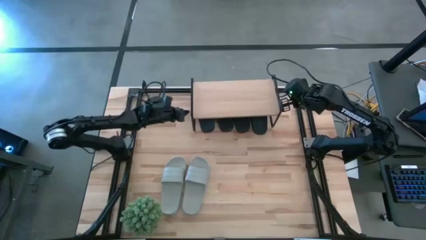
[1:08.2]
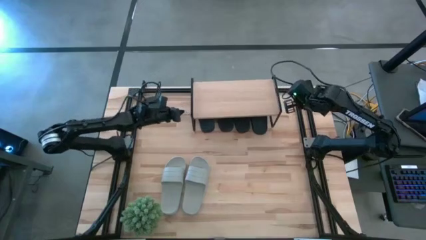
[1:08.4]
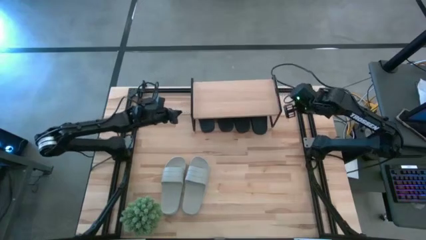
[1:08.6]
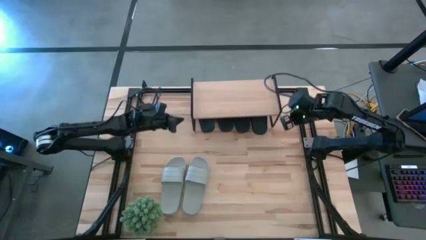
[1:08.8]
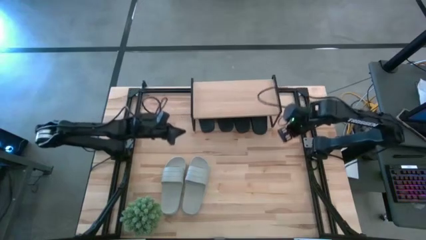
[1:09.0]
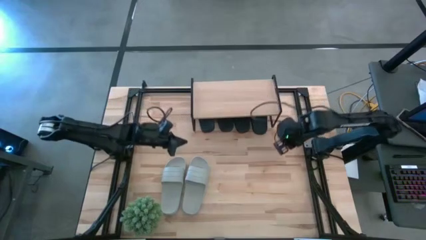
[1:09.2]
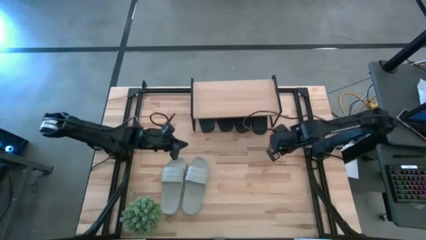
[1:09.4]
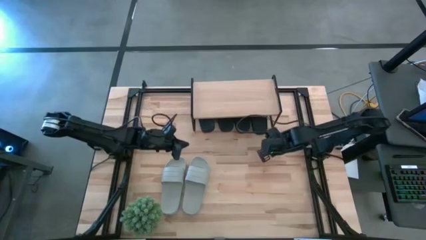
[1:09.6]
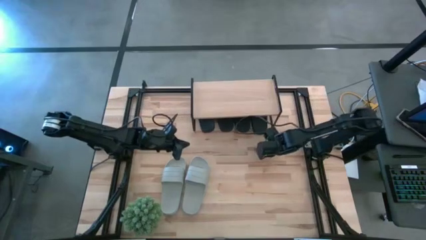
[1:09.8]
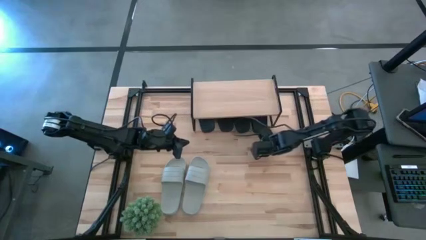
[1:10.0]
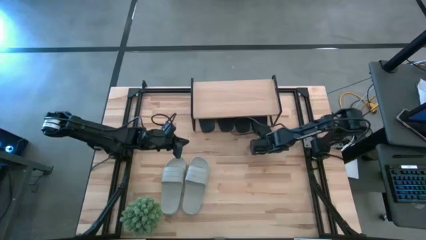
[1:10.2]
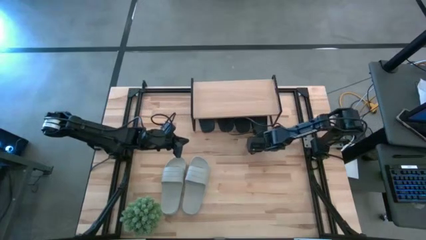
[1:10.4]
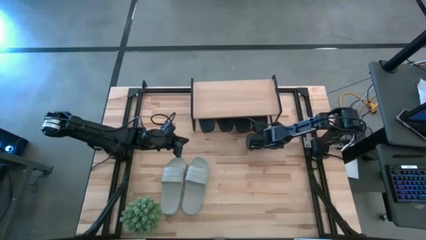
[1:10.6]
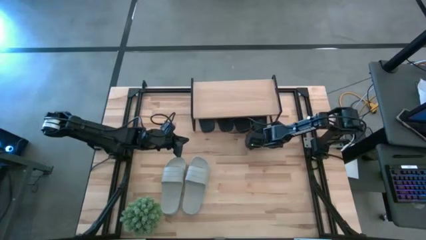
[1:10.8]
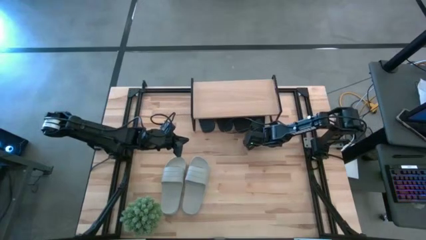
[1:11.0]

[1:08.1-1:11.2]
Task: Pick and place slides into the shelf
Adjust the black slide under the shelf

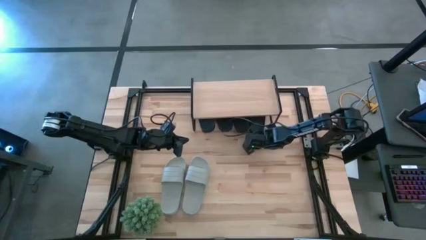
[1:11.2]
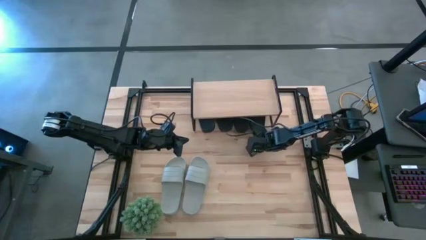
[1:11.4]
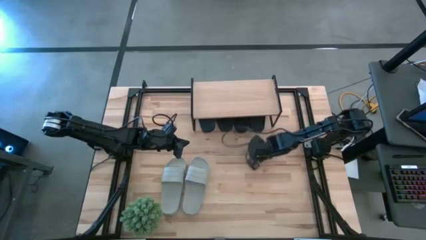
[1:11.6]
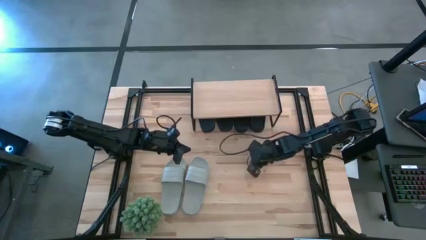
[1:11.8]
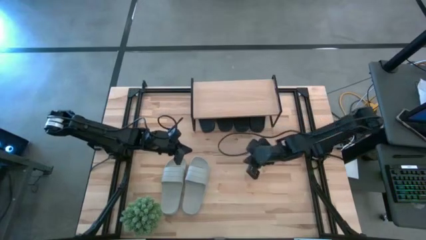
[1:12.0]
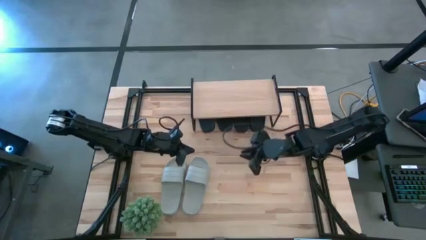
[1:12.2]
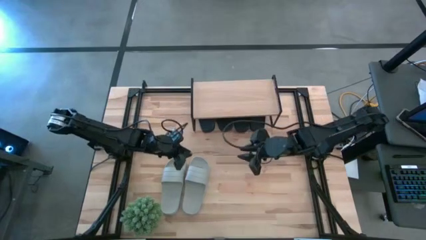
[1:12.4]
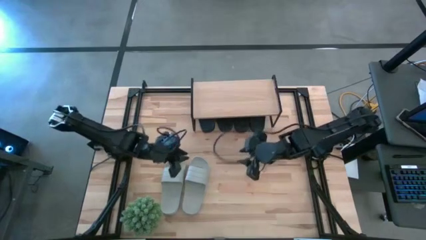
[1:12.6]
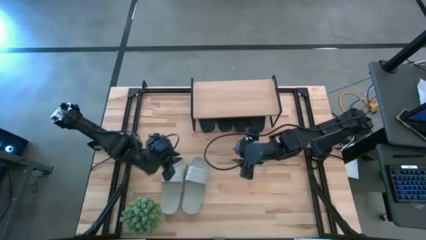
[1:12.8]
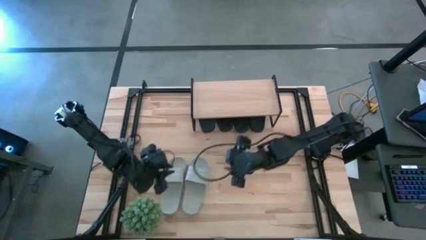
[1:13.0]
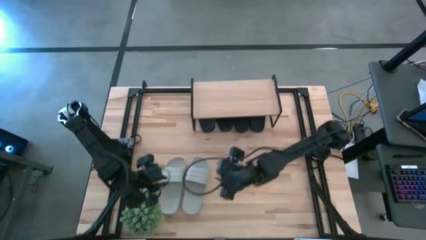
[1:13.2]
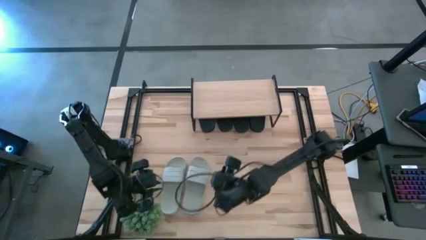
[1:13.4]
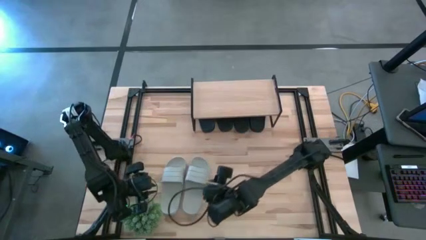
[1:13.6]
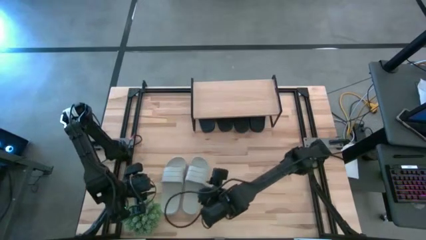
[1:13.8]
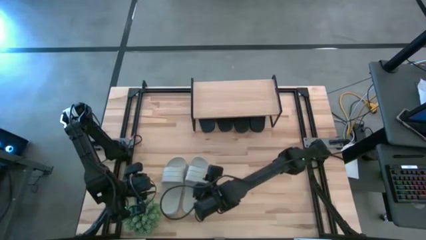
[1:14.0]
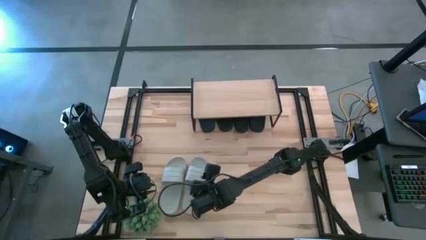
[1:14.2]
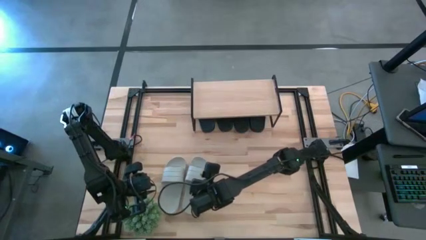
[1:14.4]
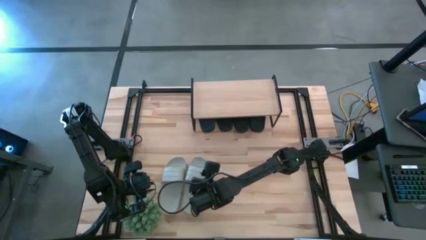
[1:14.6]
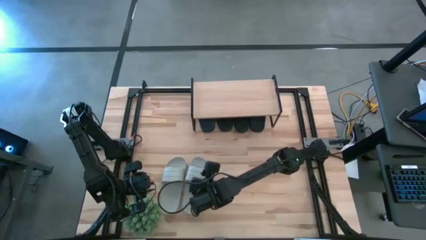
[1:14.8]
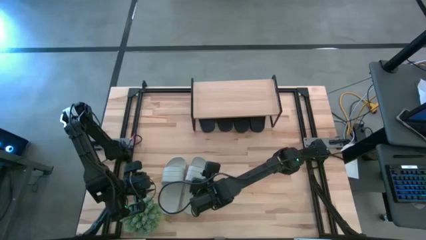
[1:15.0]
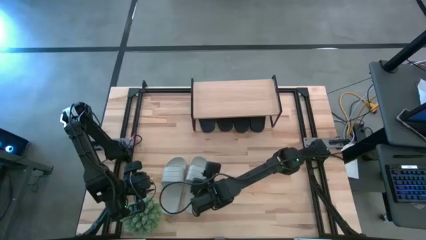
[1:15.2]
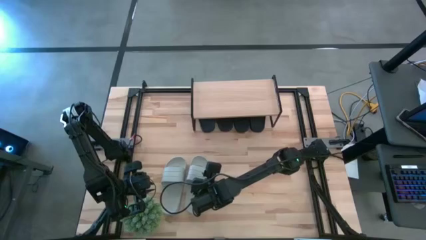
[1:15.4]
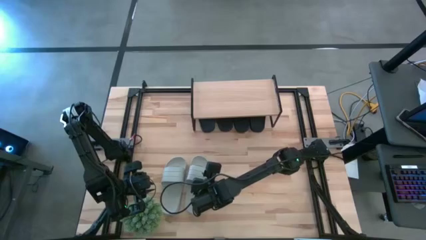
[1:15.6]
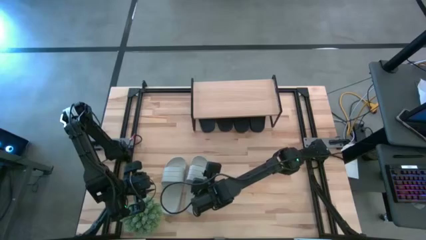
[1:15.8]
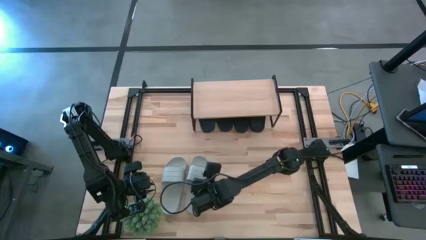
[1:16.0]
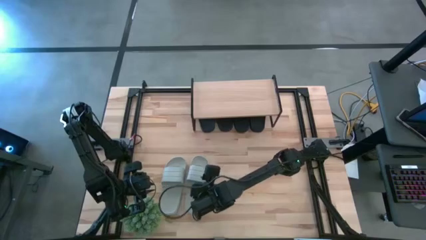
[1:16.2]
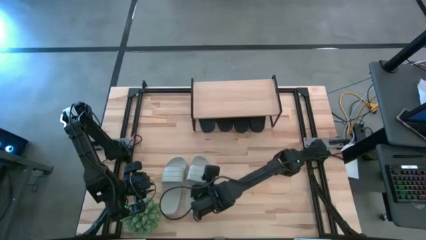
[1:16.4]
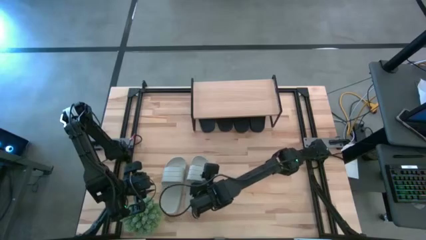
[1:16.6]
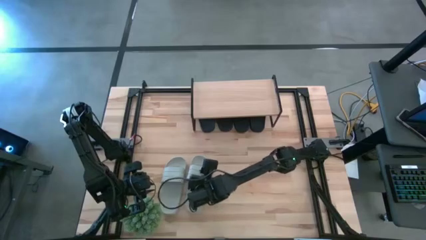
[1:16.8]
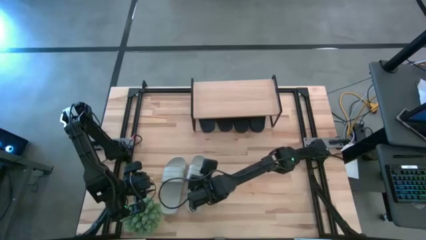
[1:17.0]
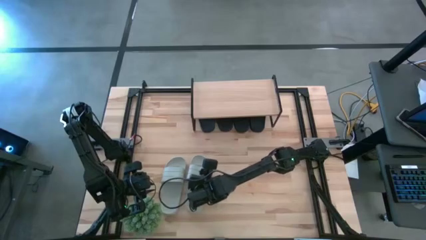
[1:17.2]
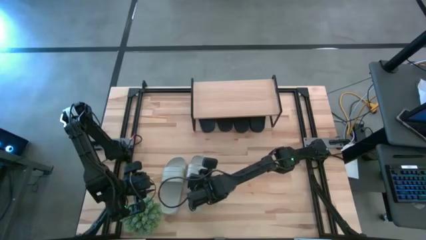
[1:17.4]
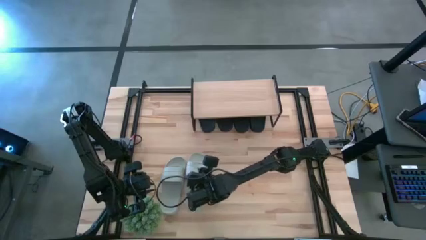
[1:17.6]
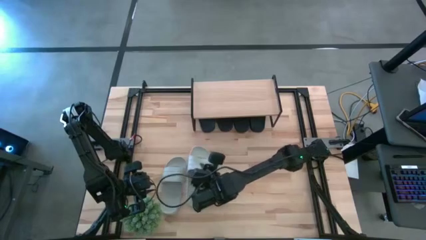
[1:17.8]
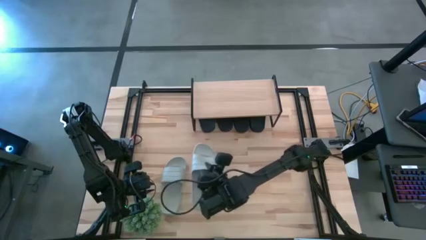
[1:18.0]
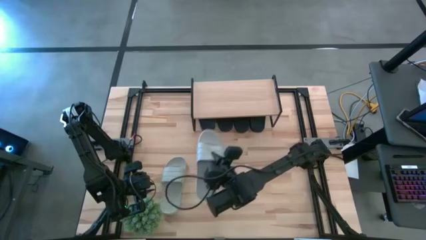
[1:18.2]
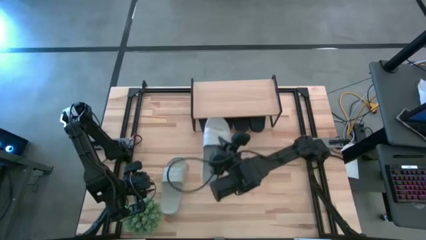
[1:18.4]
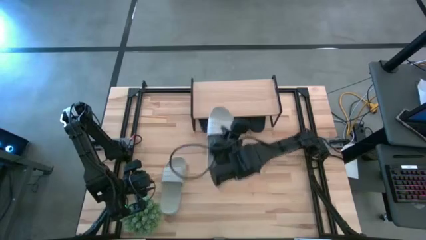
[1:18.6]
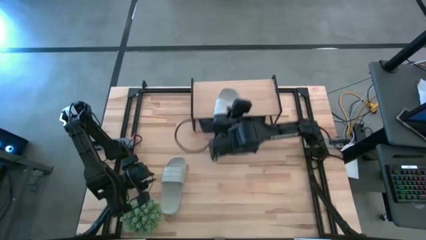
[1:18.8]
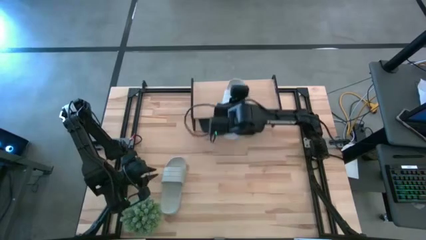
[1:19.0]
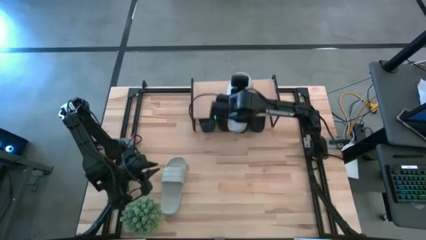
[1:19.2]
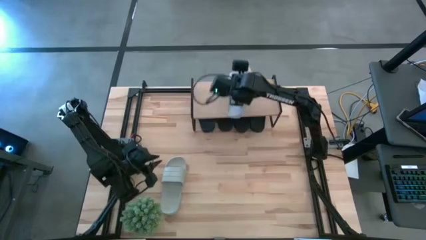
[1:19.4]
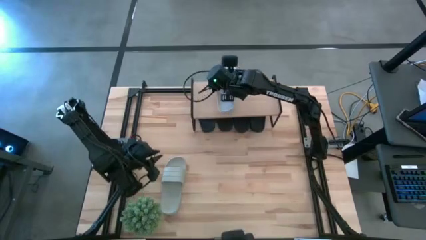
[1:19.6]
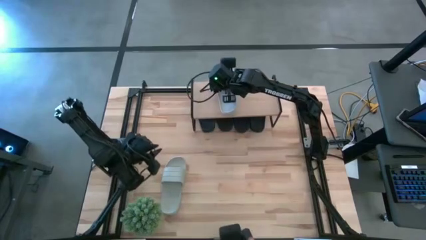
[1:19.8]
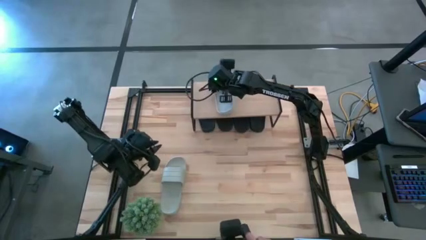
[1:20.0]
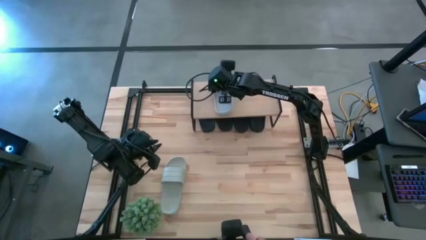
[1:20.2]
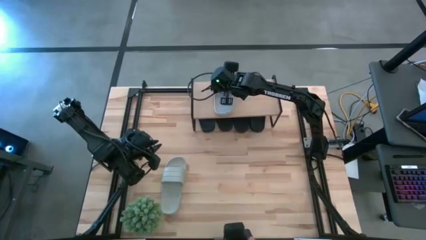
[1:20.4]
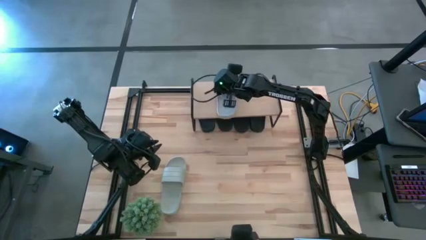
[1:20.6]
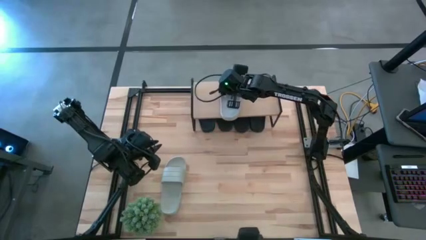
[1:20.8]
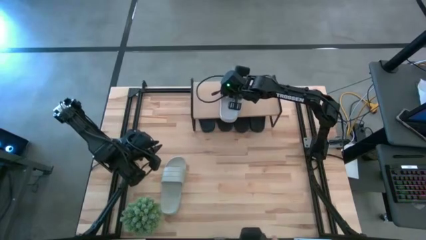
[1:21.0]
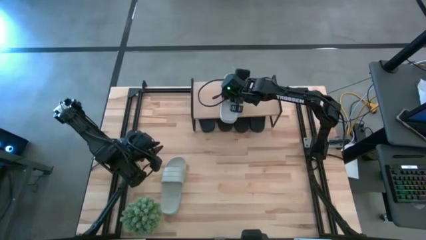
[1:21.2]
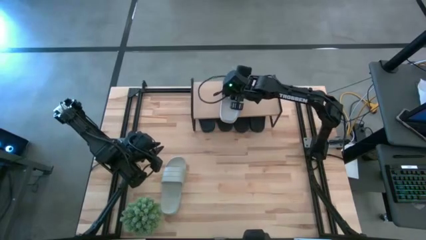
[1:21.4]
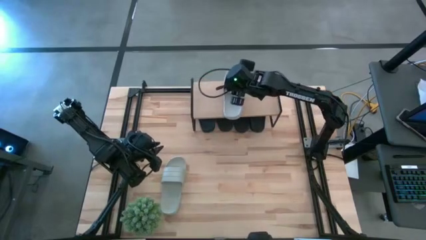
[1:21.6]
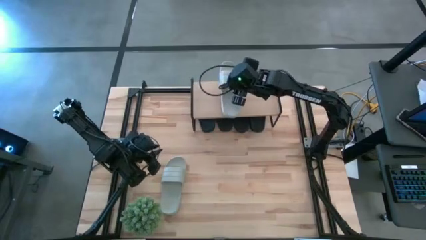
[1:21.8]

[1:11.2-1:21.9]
Put the gray slide on the shelf
